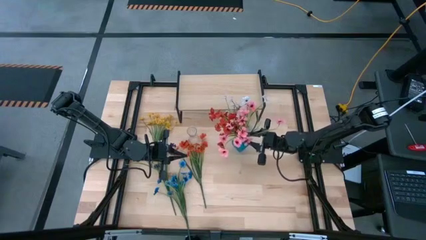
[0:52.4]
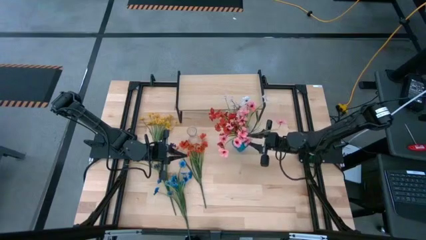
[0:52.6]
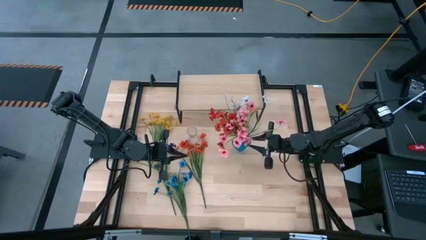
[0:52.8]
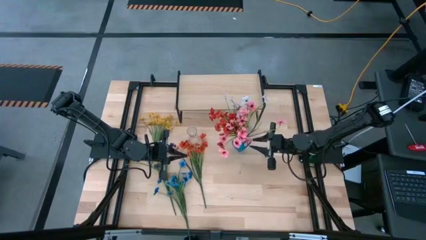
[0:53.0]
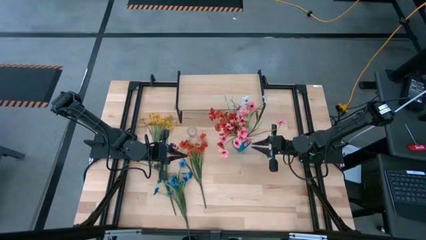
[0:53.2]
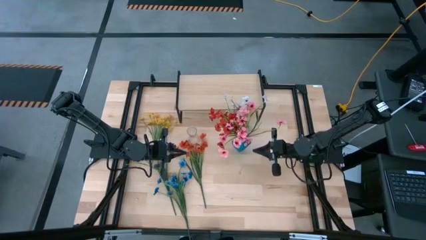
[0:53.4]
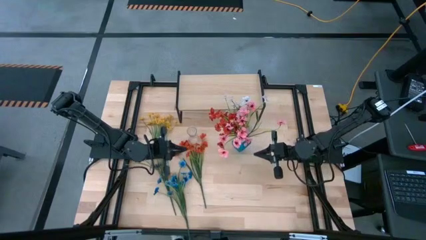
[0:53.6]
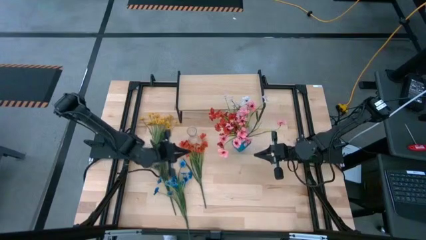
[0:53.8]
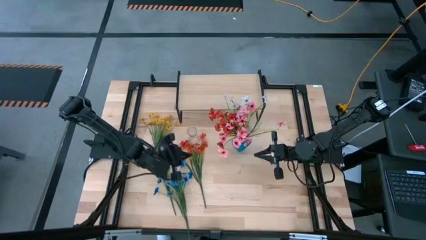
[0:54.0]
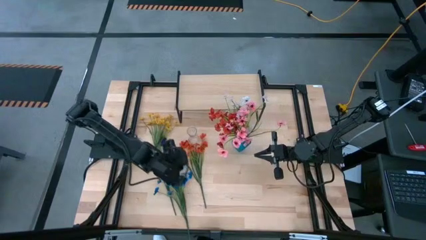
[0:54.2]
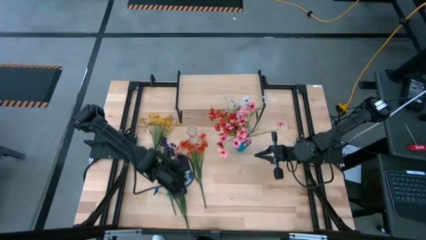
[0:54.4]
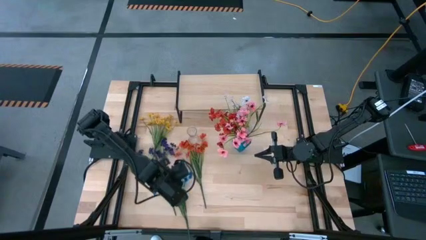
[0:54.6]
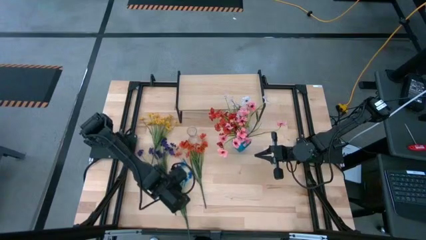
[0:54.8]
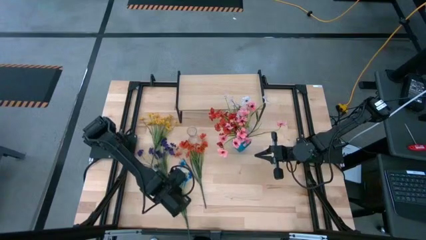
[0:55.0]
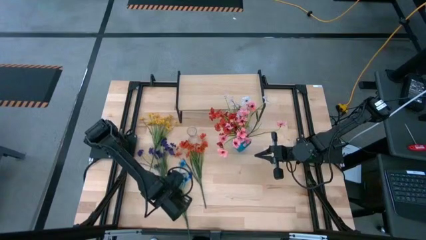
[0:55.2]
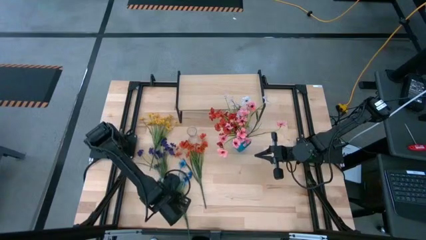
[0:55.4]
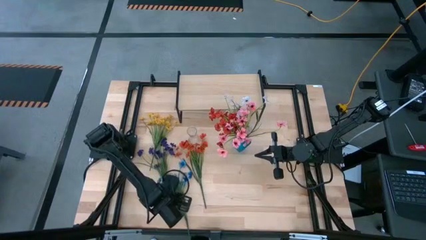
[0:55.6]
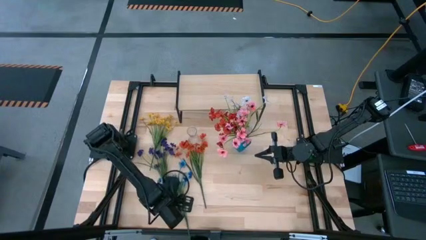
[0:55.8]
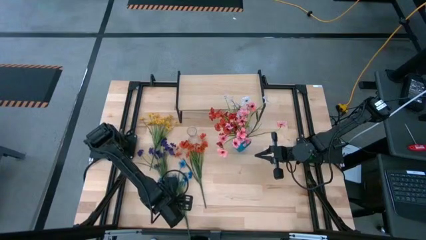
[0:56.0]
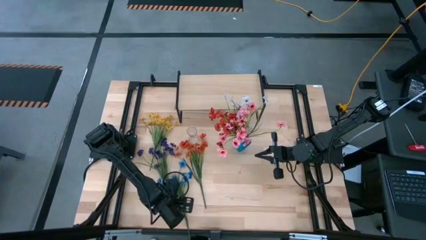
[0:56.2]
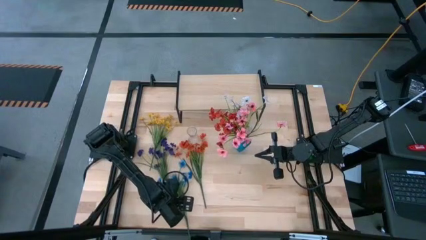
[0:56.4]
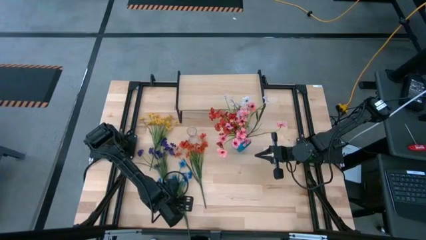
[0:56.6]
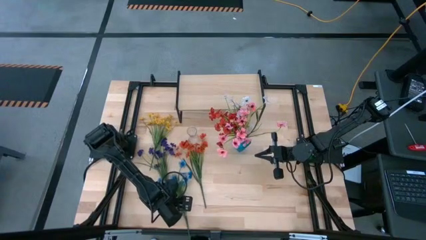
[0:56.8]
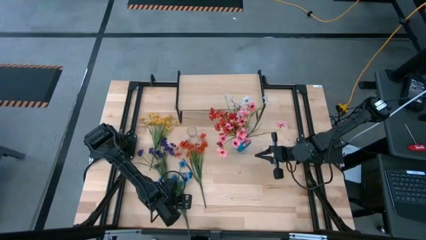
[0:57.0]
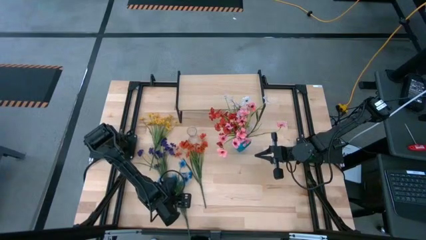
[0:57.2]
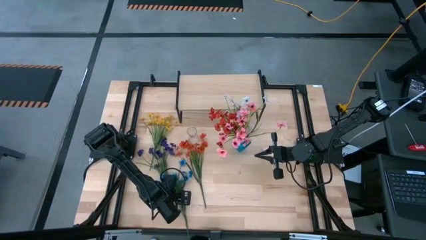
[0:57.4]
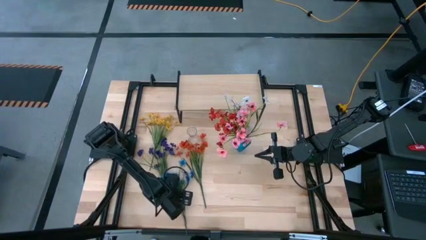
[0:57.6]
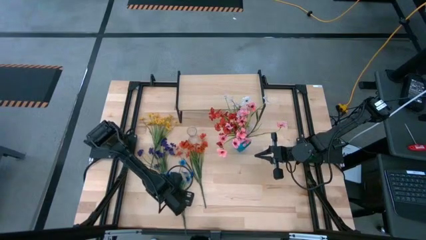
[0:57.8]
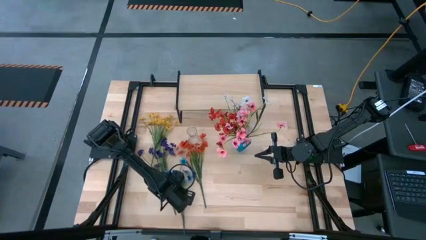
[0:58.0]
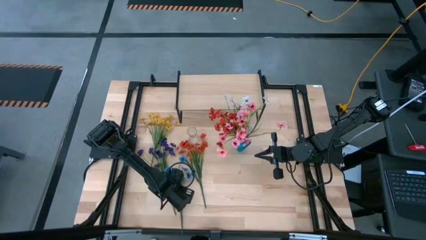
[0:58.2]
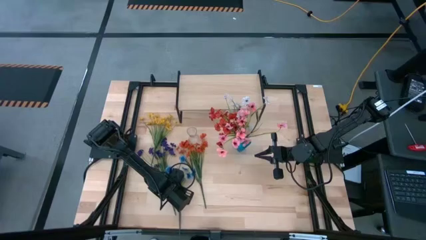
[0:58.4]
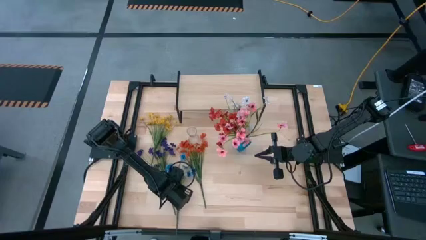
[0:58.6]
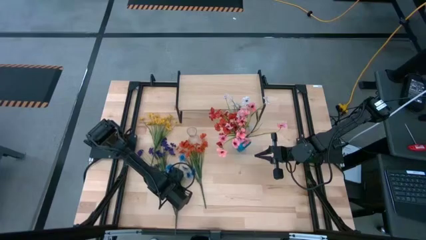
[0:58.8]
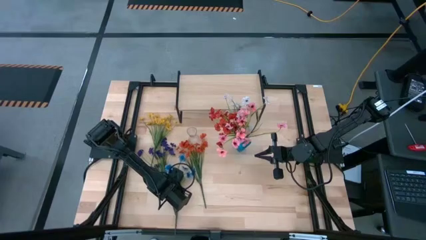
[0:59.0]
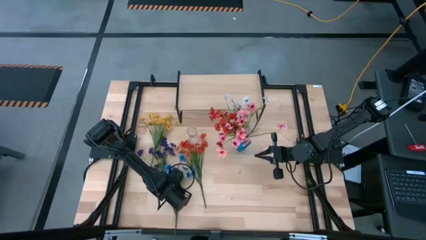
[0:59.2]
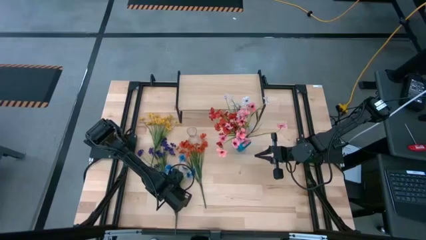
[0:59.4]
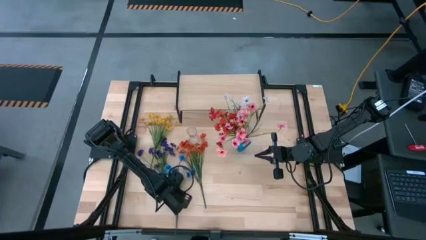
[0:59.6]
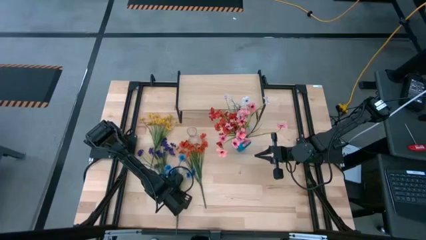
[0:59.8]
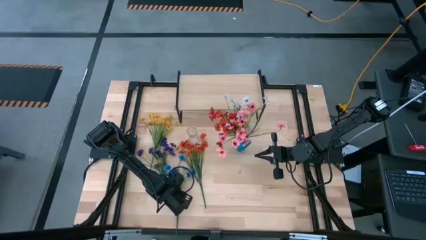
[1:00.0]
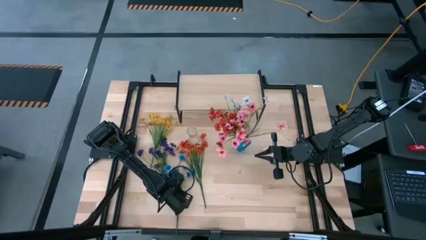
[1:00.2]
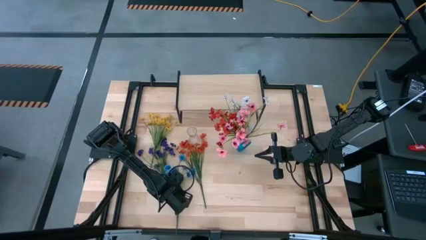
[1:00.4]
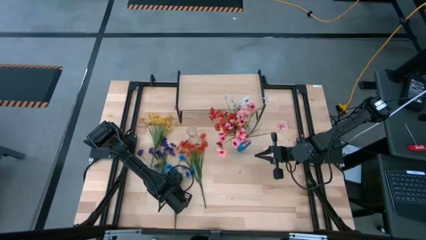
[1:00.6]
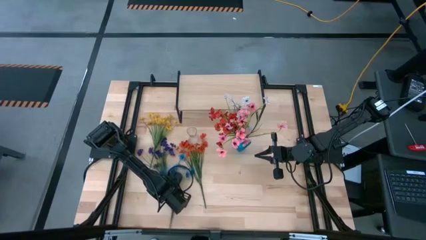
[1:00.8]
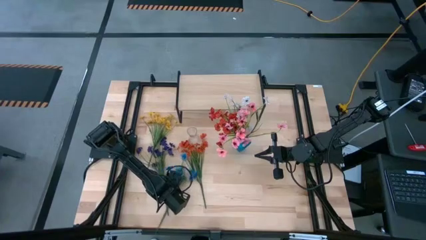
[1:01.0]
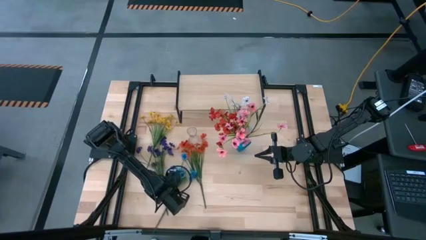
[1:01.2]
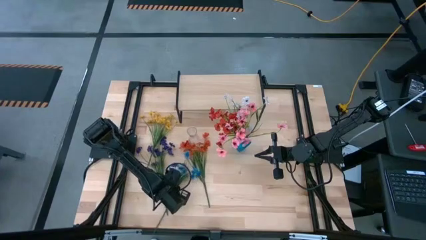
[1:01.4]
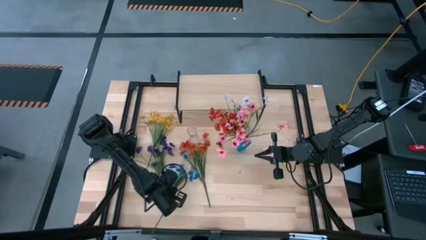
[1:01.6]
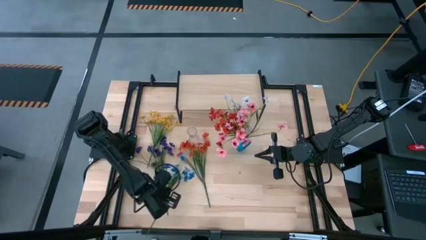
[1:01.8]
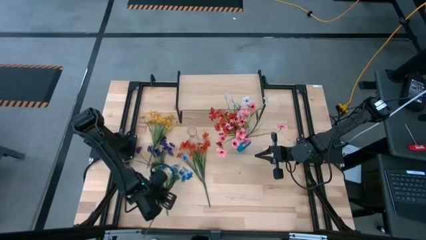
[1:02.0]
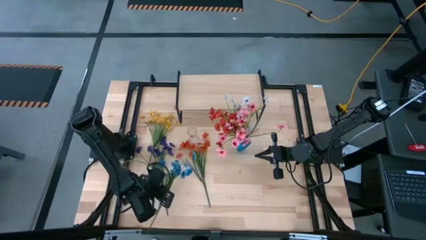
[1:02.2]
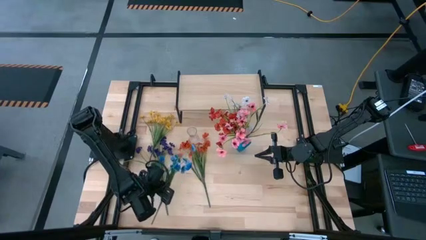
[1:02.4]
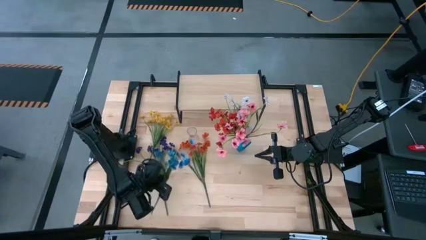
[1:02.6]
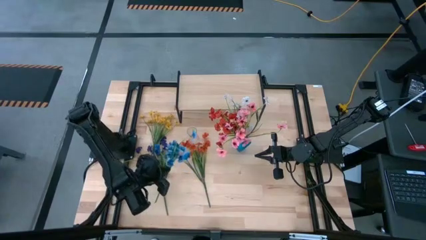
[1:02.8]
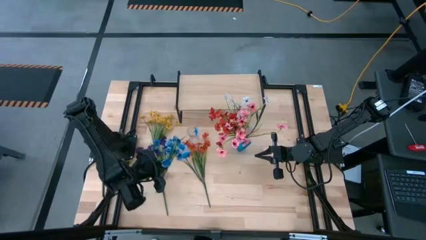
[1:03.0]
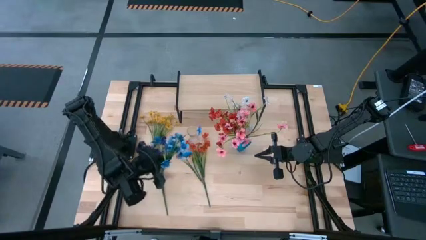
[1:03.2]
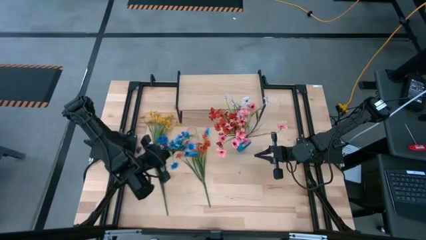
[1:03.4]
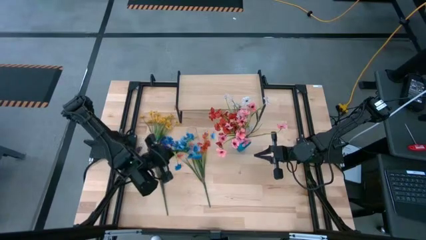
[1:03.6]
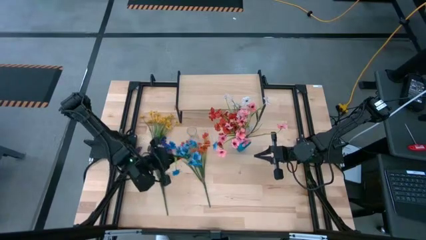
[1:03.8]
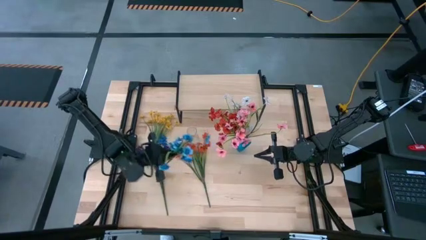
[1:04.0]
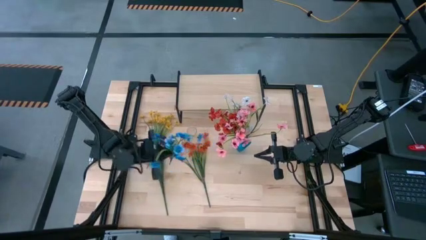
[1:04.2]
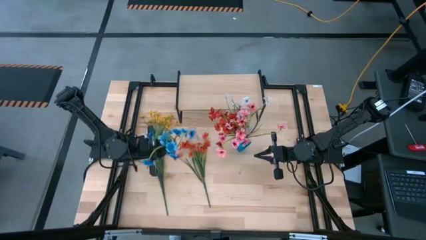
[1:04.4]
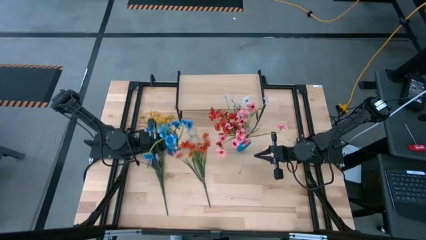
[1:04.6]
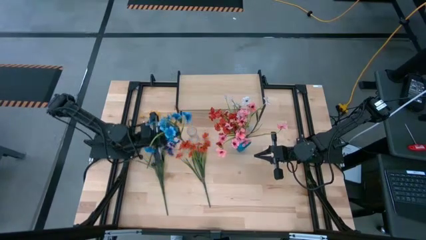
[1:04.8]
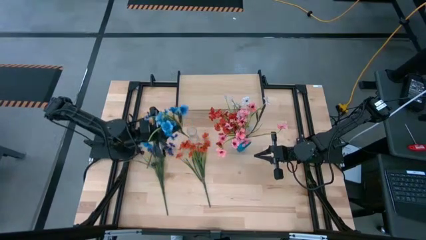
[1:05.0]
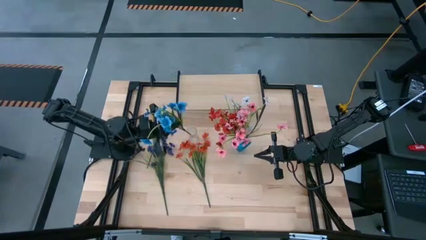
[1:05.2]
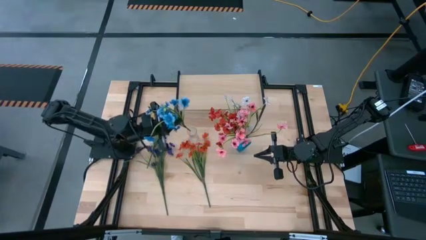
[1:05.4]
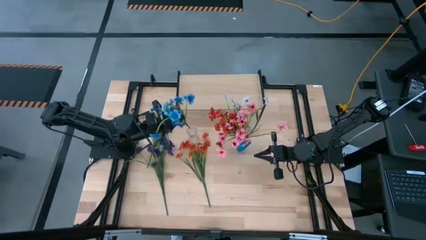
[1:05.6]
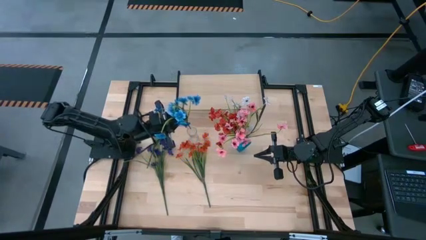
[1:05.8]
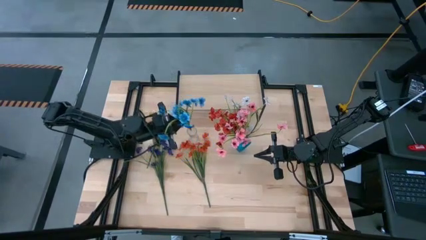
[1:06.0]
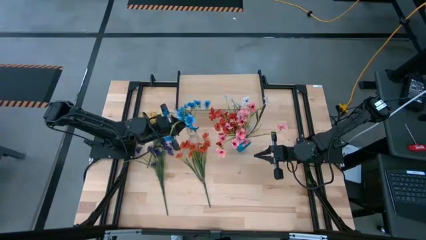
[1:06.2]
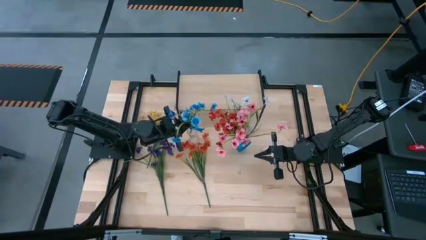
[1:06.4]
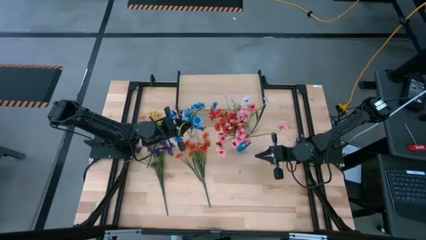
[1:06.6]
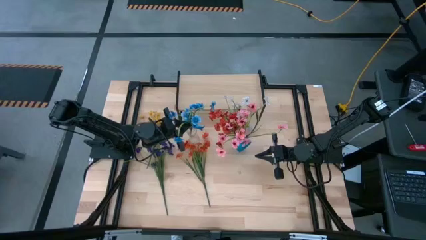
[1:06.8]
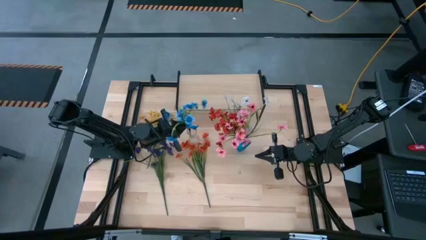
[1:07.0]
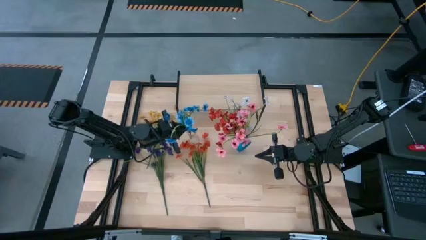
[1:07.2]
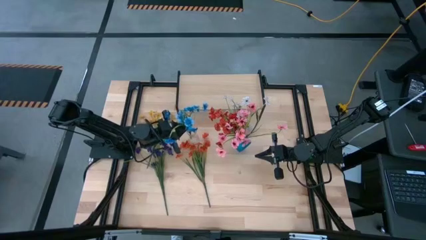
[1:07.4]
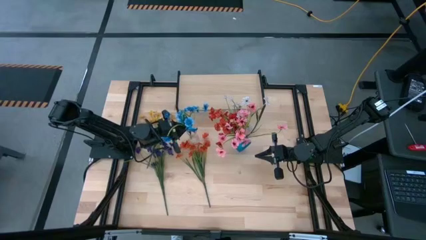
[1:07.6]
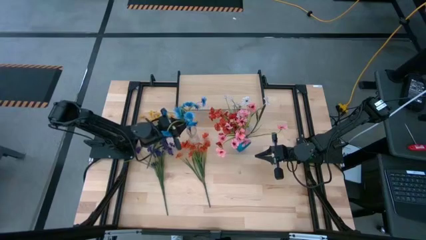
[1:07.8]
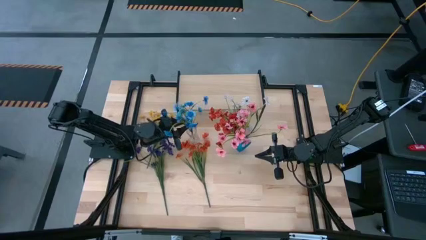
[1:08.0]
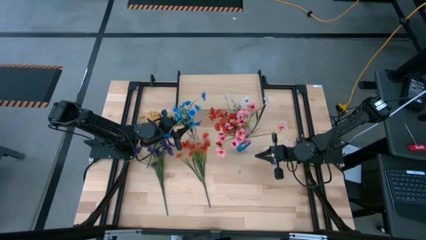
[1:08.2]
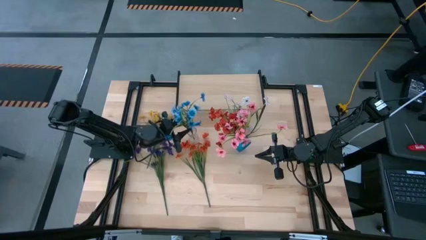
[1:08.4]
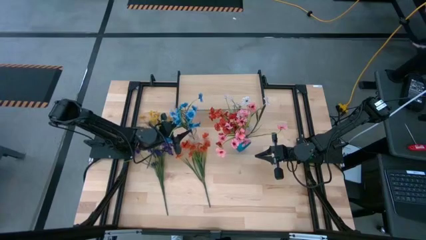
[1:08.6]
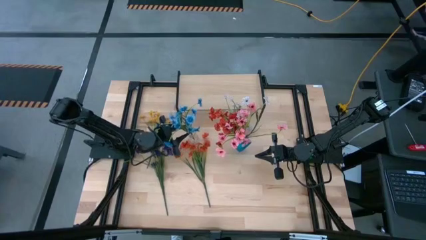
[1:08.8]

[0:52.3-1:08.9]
Task: Pick and place flowers into a vace then onto a shelf
Put the blue flowers into the transparent vase
